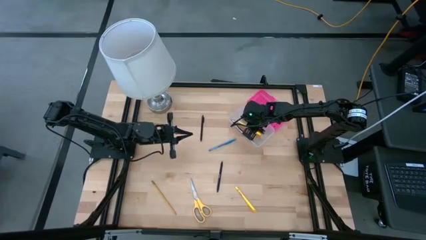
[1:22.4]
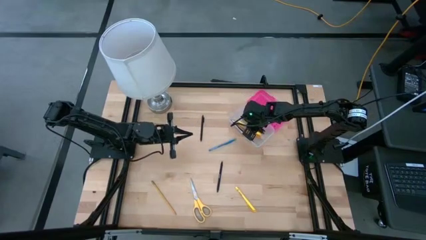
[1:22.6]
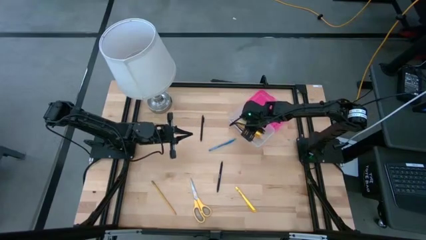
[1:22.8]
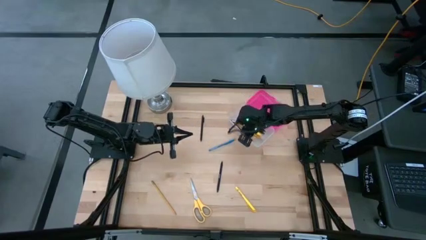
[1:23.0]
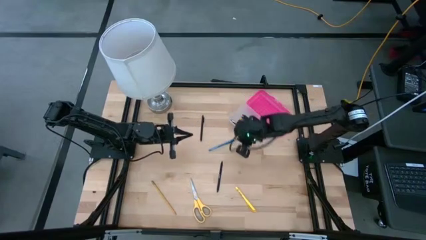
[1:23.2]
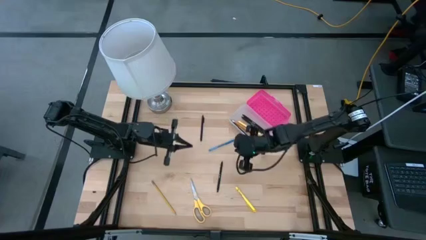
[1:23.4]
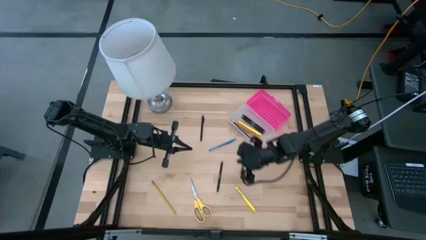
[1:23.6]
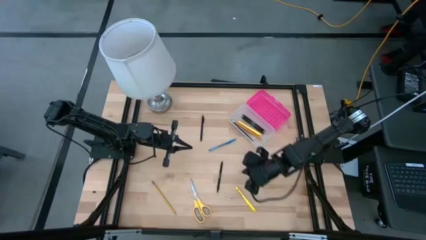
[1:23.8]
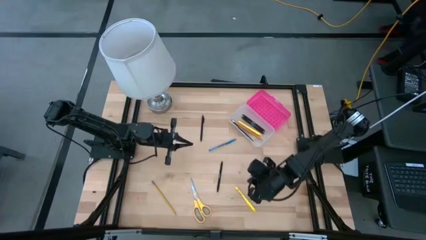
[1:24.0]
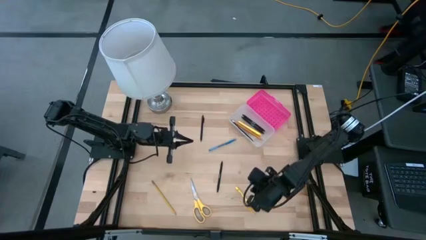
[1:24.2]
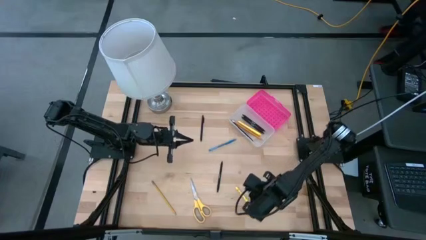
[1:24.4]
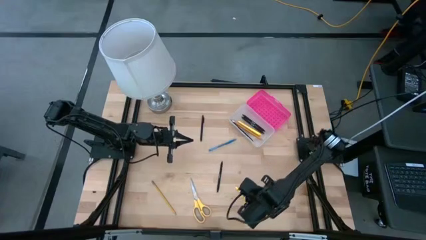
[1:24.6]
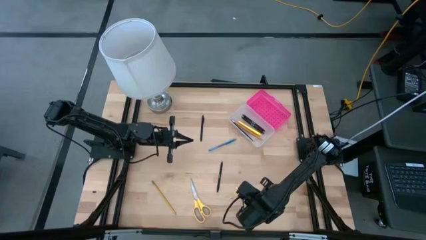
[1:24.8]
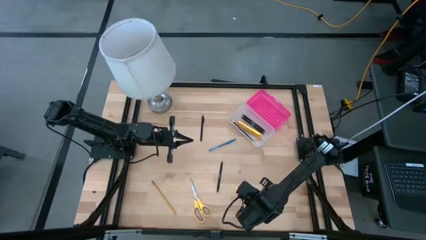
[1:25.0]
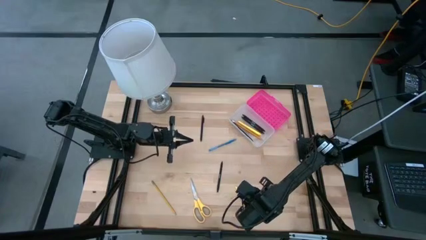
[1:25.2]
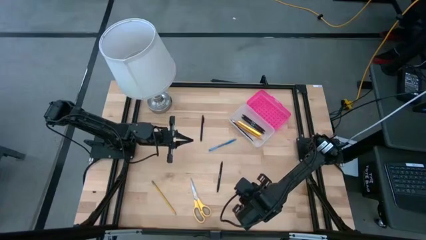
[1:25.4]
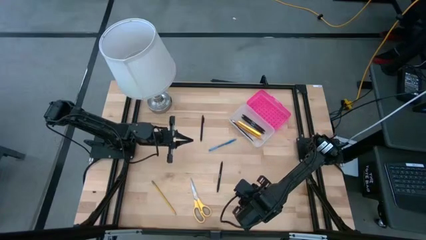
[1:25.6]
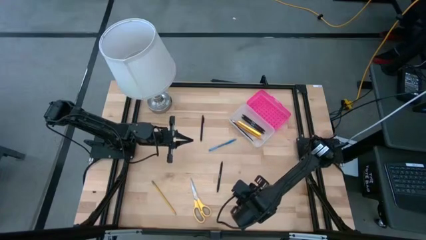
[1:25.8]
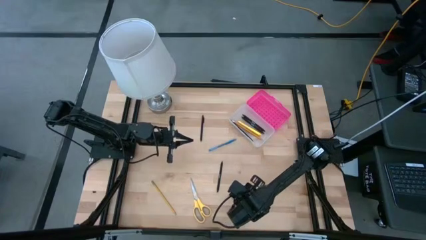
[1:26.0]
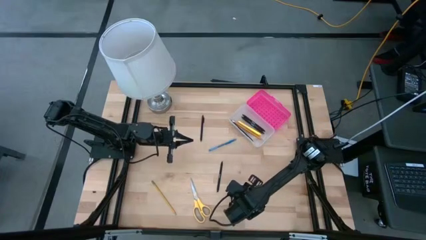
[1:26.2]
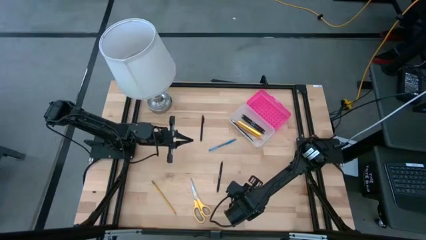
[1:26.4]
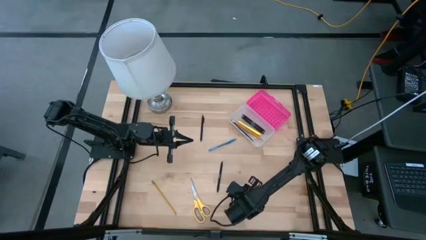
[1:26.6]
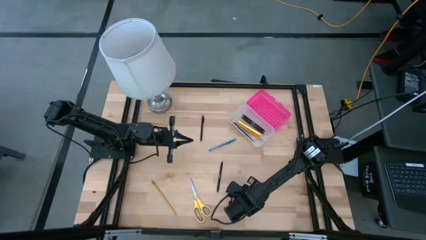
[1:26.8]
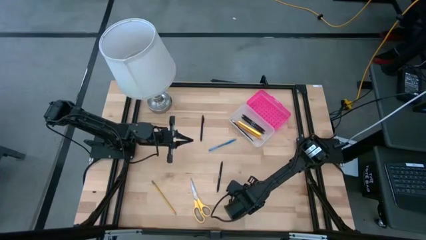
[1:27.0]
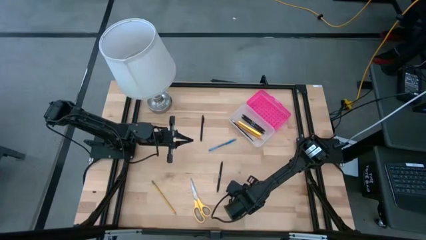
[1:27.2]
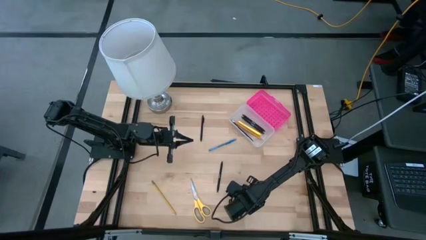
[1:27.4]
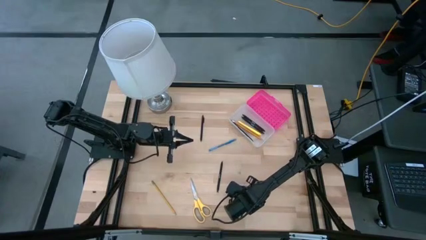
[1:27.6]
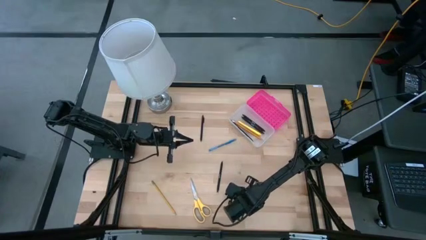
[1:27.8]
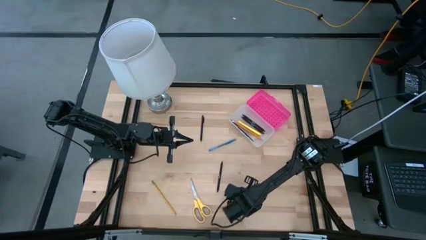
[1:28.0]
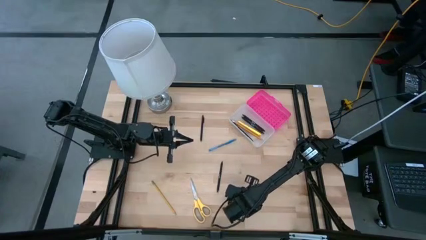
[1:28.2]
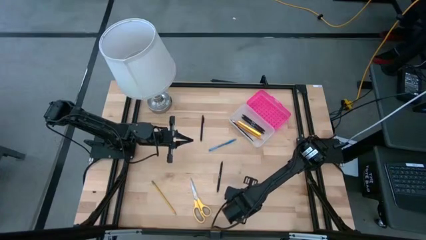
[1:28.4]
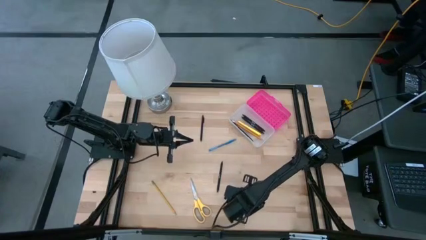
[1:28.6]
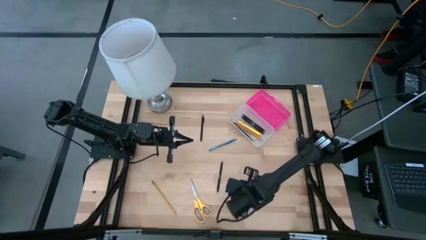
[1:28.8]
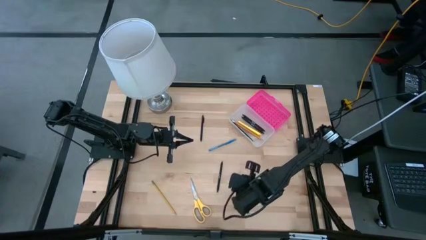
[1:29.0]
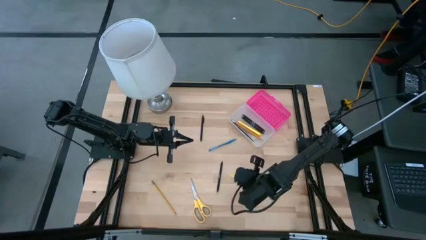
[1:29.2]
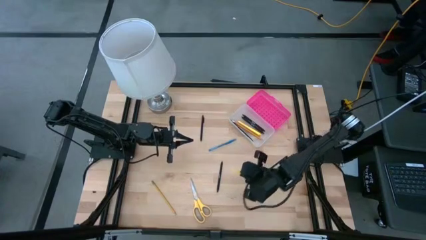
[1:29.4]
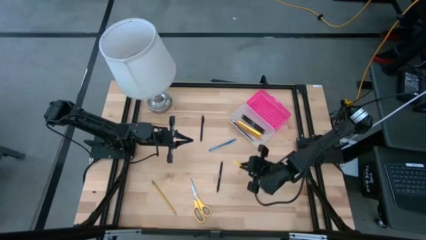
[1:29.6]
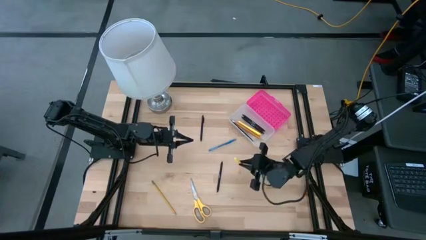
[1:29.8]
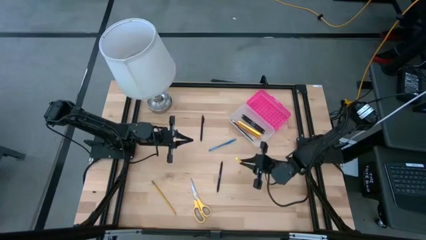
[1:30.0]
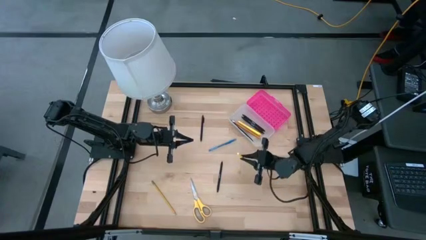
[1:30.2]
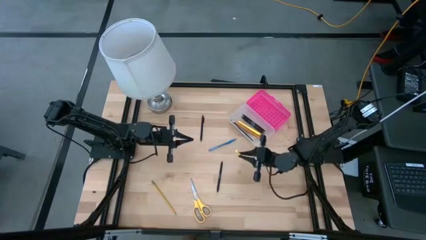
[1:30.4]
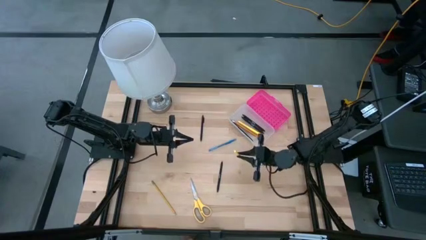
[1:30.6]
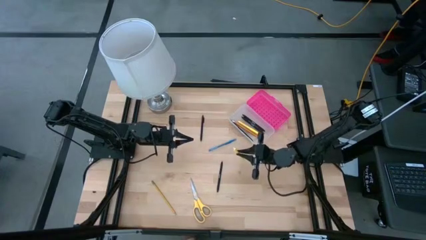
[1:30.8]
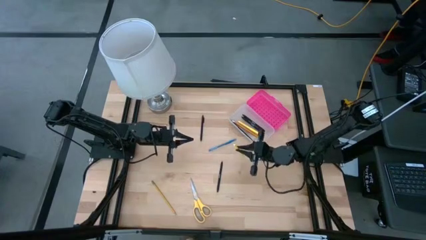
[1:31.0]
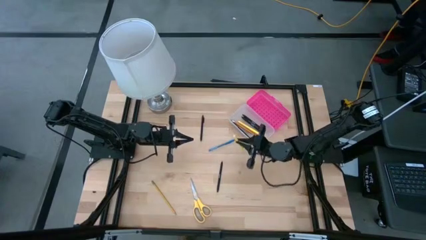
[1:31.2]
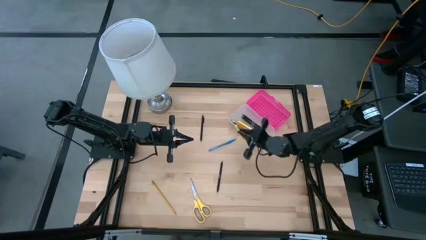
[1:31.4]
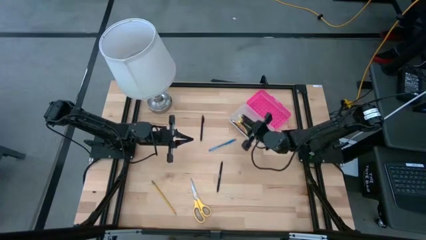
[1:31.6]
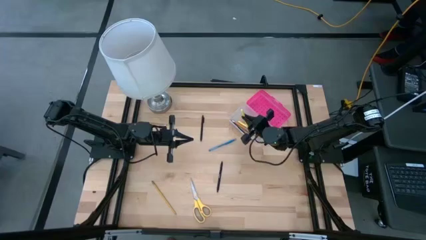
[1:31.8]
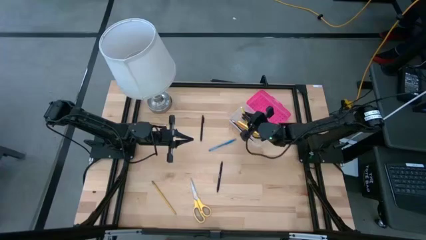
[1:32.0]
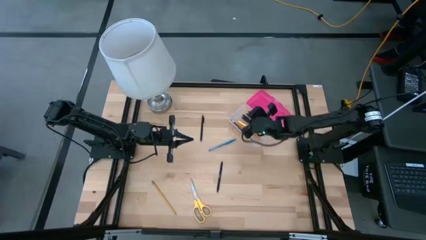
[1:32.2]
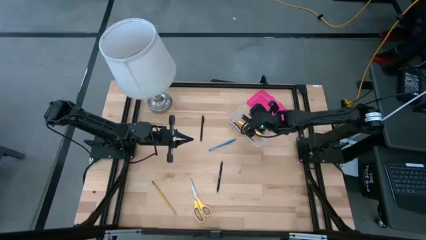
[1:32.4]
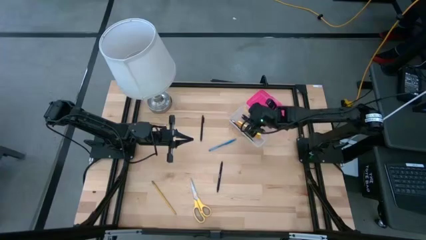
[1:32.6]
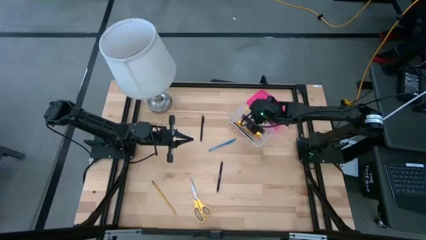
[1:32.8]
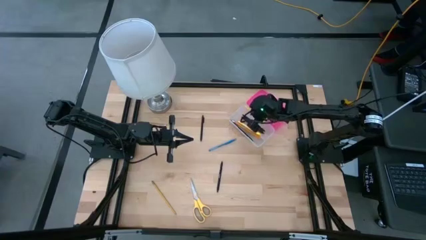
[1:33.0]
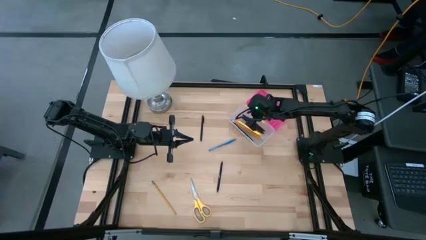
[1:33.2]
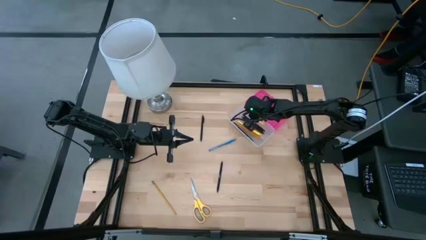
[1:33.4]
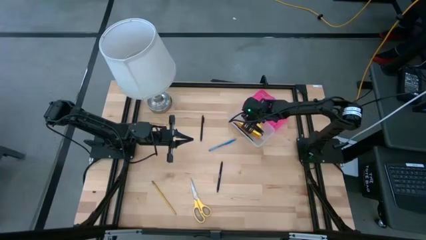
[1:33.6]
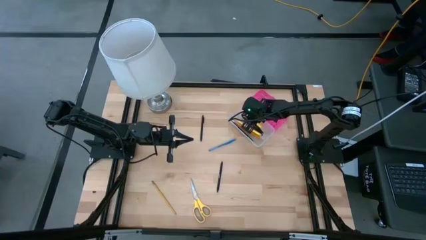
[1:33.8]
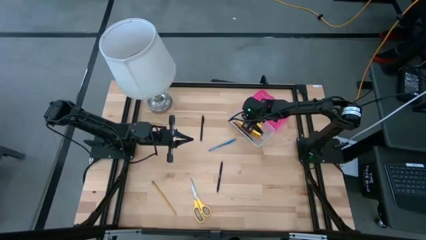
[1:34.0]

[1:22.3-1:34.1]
Task: Pick & place school supplies into a supply box
Put the yellow pen into the pink supply box
